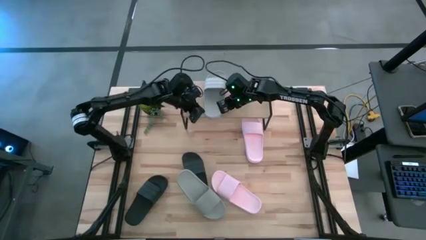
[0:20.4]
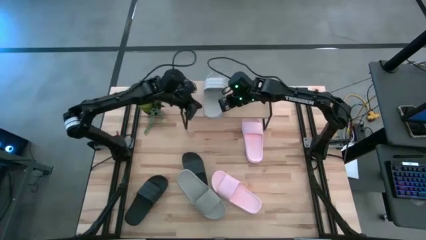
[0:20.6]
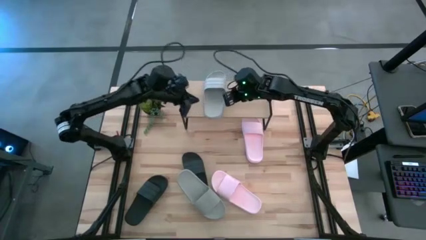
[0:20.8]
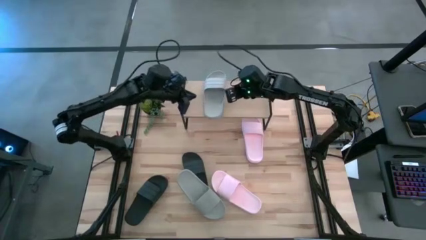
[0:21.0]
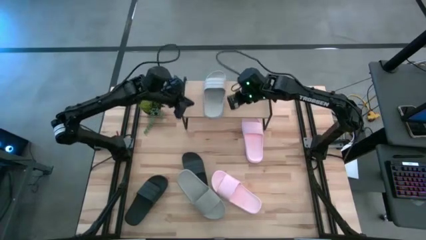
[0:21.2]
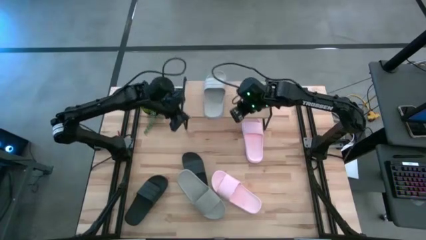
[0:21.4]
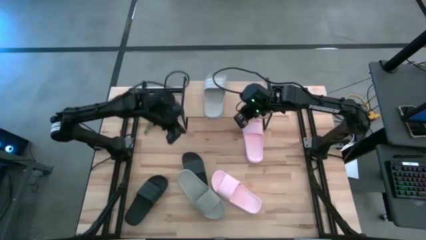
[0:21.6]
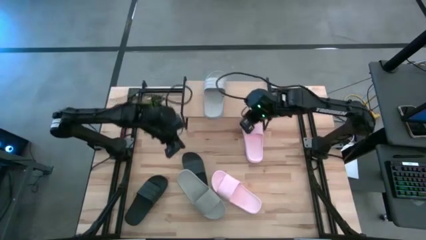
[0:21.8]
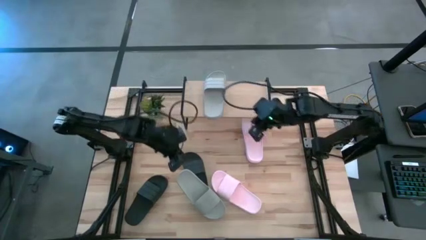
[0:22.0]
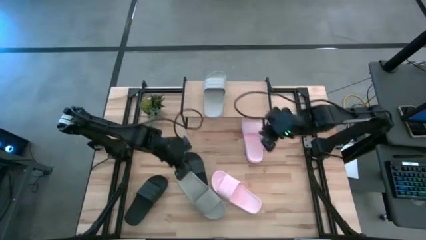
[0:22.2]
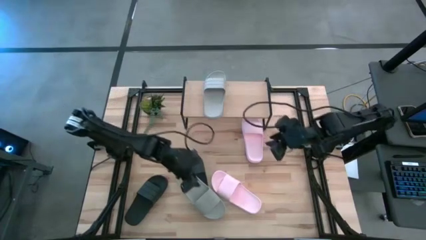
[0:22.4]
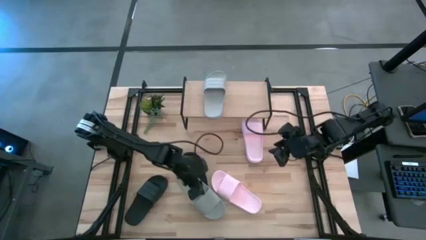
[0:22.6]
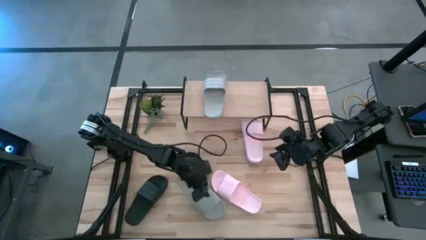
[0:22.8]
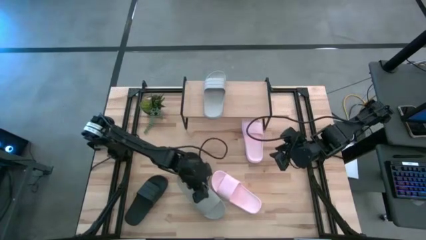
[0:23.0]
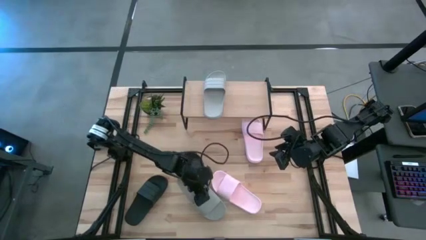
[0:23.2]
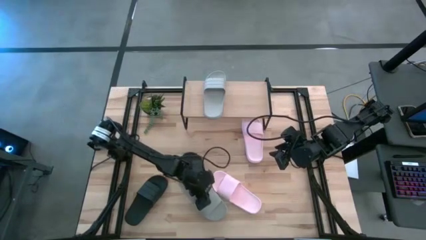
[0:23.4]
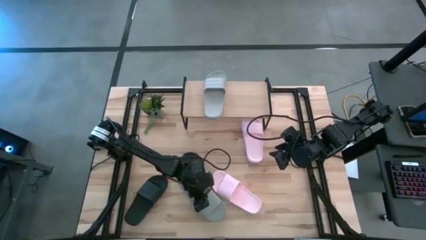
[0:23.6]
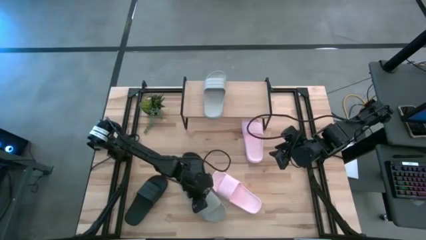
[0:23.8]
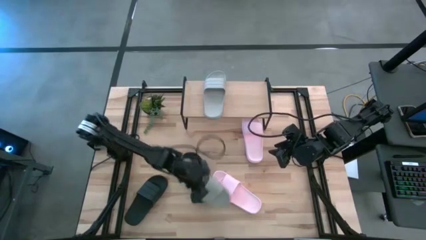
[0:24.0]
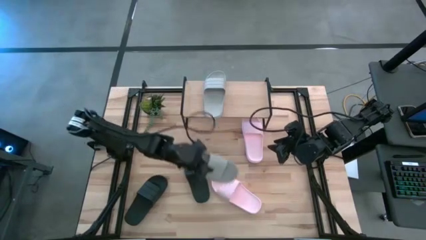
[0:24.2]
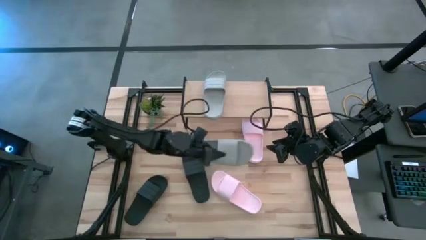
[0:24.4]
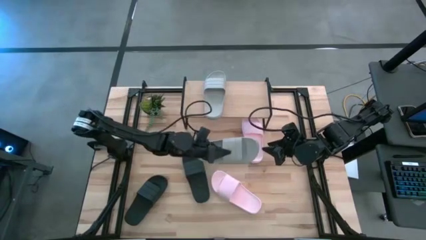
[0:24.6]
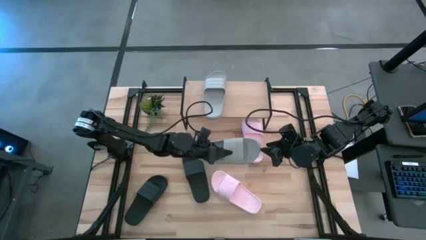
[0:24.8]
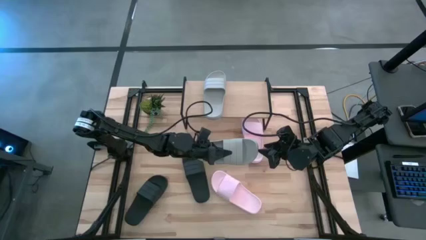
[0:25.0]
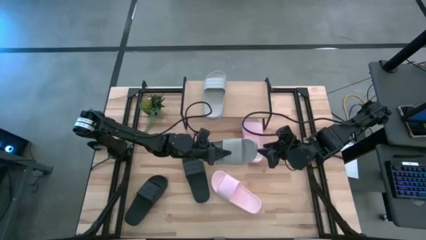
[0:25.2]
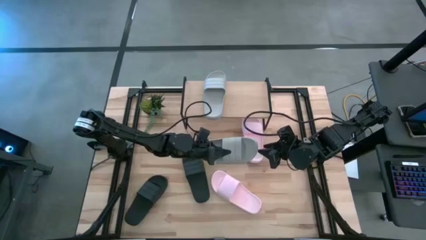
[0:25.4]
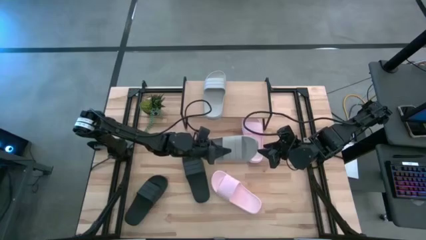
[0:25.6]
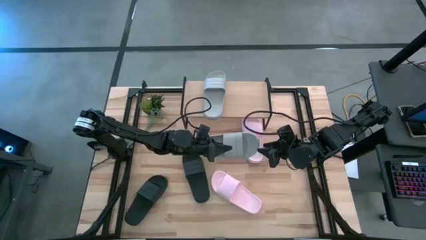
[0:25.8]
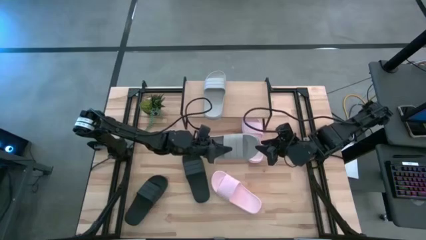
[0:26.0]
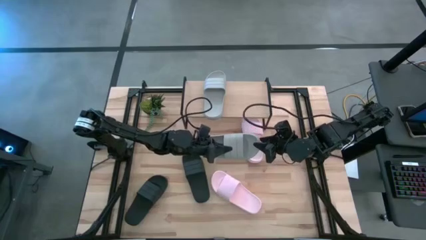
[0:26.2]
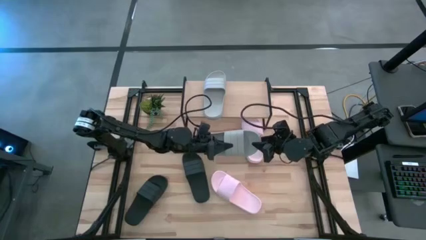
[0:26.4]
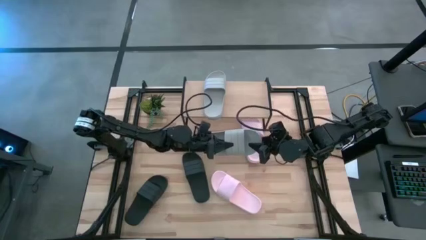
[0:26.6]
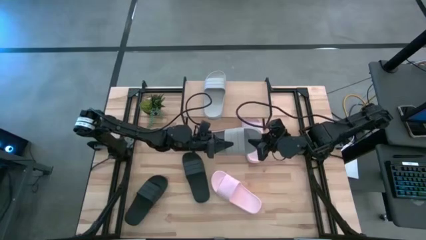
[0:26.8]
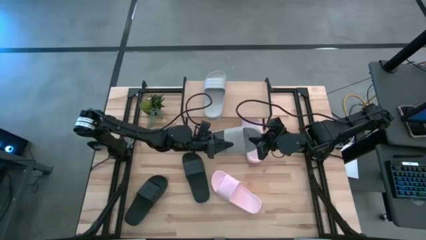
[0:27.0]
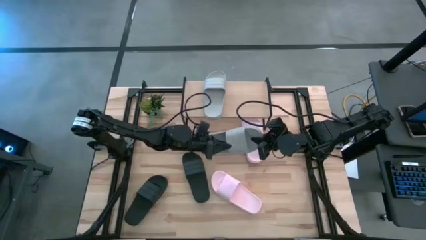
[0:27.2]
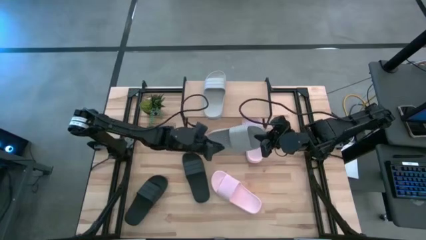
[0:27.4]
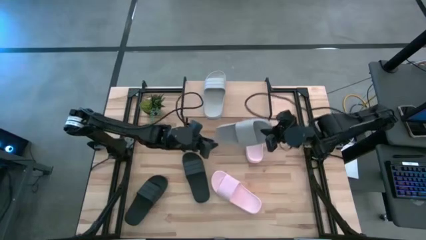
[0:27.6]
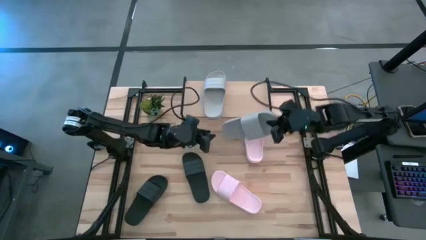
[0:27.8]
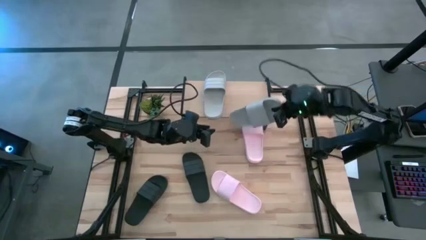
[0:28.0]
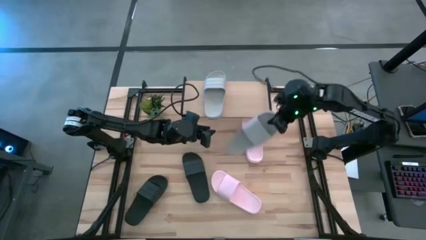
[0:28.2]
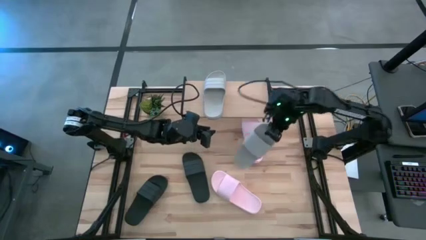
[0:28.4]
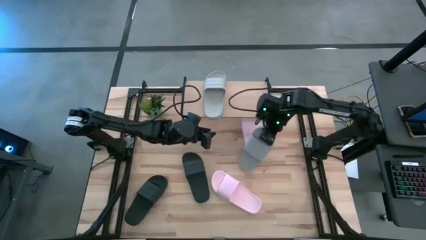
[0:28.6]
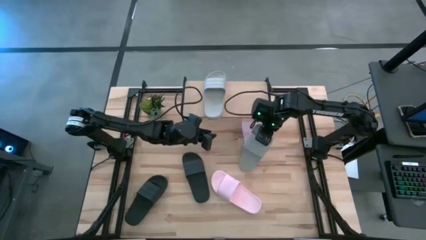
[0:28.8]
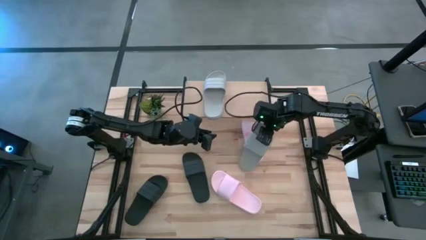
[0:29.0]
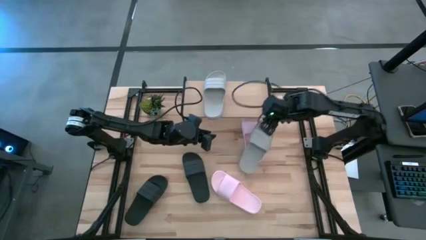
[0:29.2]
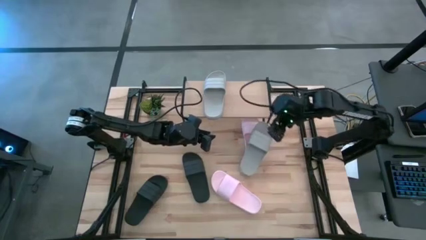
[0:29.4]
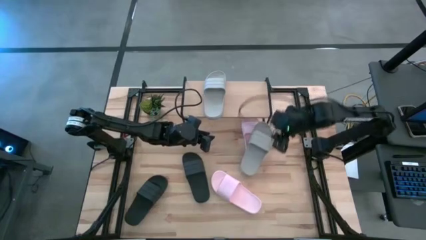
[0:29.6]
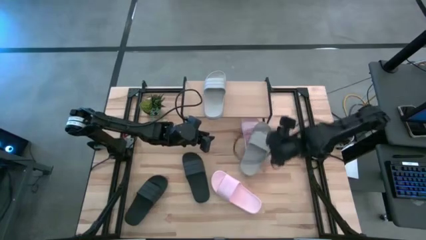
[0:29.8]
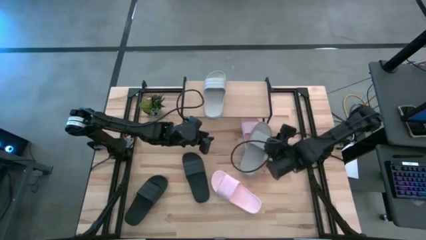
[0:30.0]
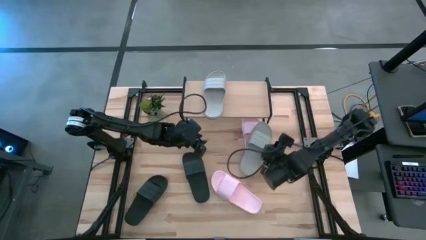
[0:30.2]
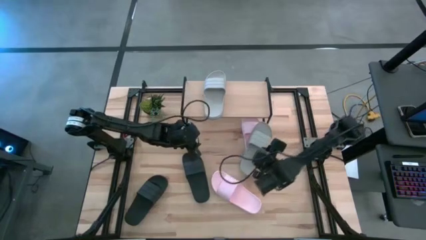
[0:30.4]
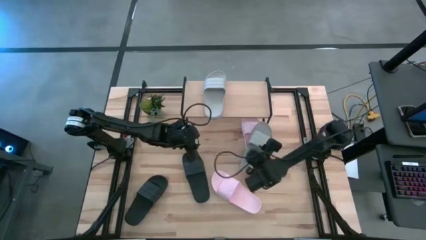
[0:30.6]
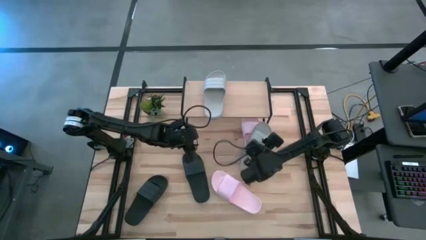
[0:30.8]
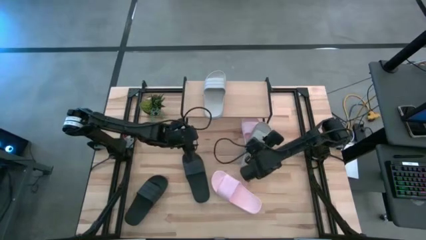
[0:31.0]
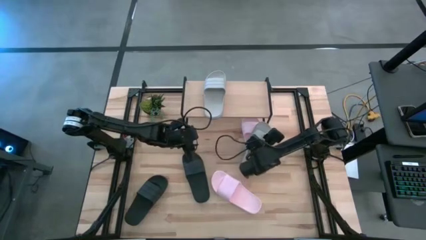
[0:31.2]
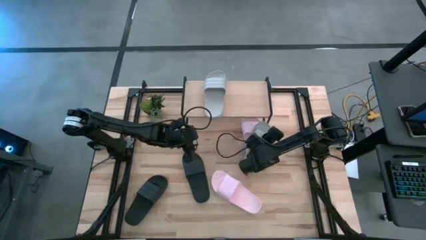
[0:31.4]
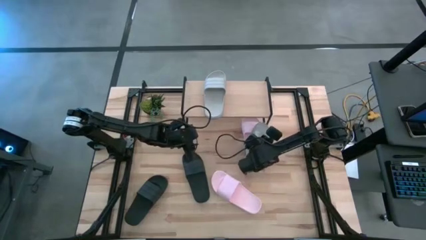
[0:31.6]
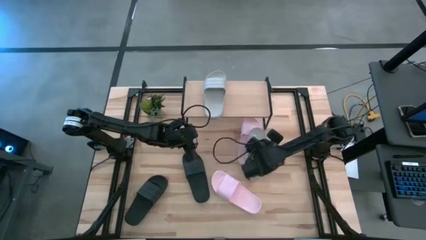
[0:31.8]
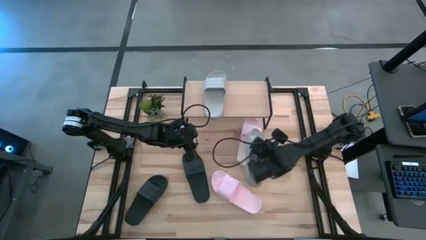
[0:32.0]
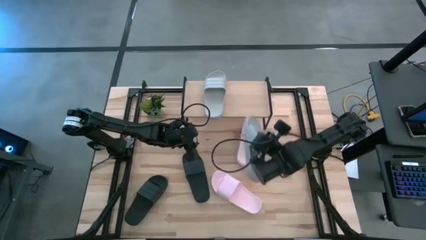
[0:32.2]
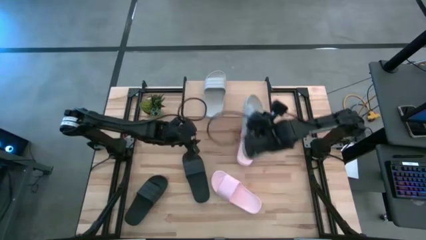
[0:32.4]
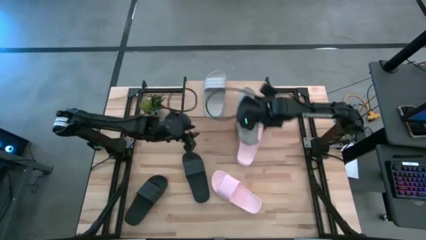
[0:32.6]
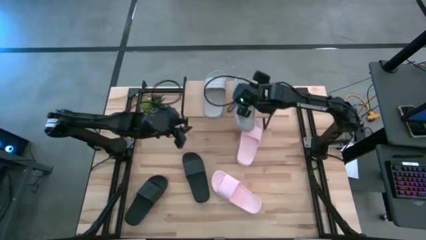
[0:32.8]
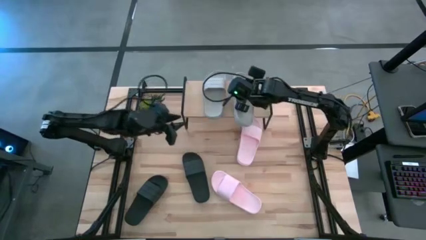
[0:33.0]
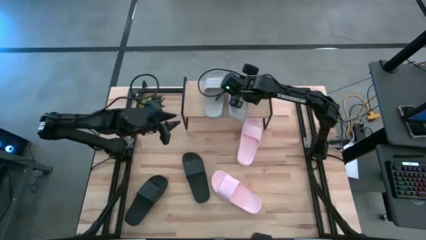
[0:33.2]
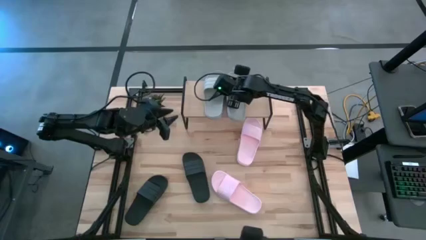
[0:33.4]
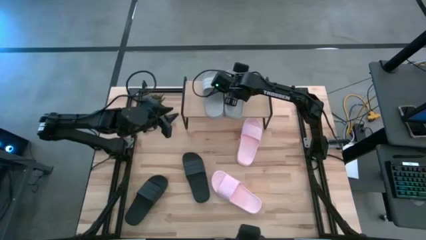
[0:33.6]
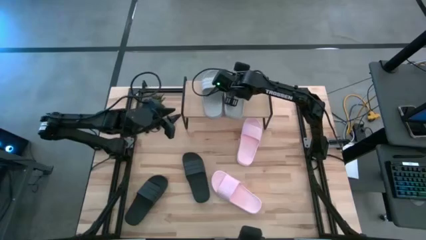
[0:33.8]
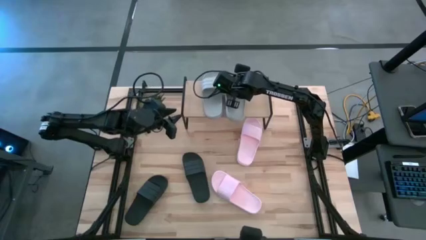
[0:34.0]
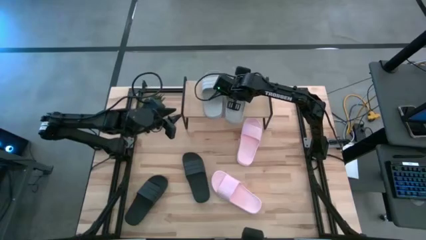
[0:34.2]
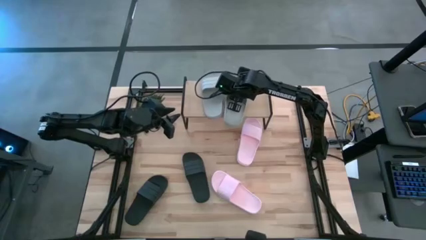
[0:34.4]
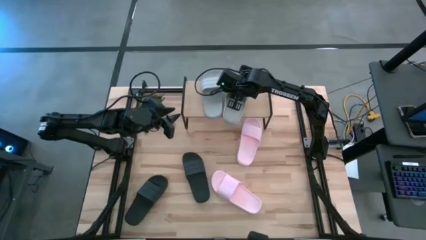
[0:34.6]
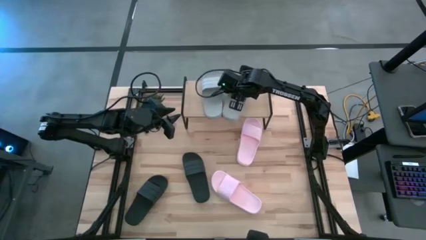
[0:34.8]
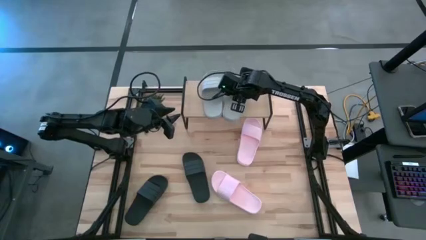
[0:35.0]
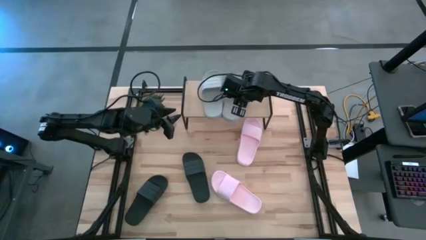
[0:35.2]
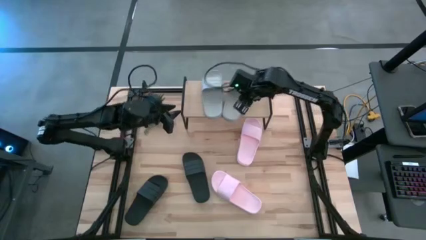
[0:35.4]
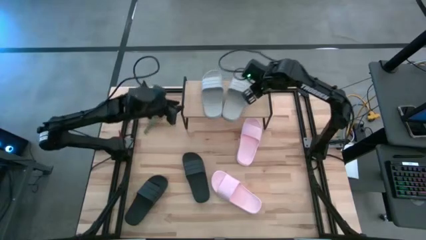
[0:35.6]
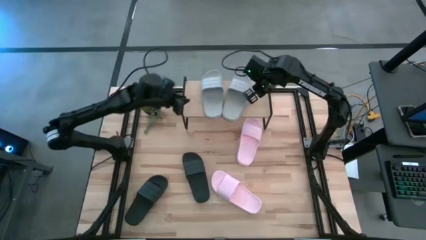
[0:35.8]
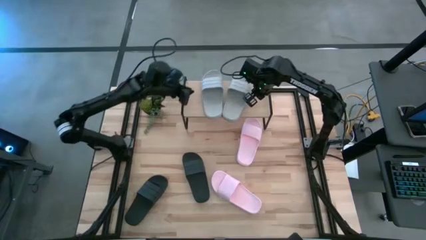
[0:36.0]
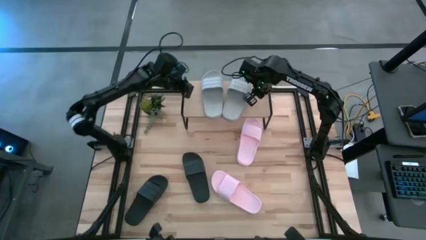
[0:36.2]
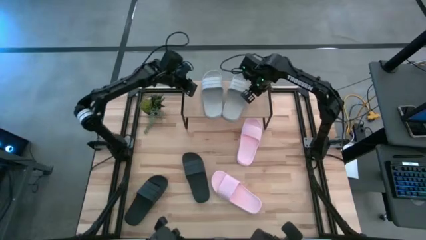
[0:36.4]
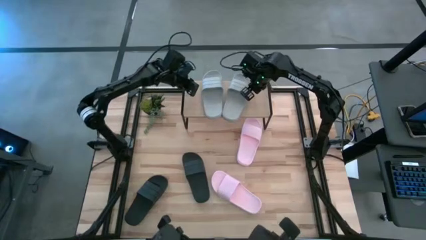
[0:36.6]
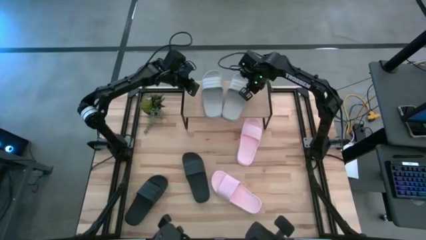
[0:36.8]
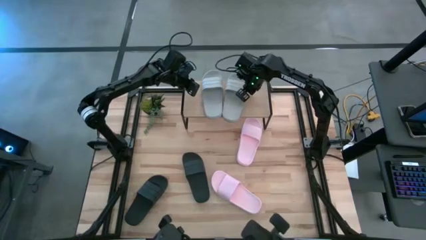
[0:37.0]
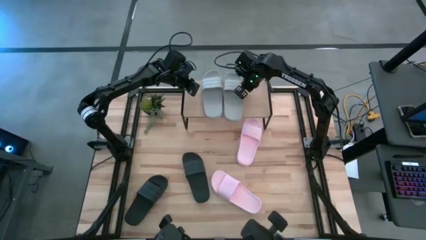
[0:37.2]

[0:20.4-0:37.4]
Task: Pick and place slides into the shelf
Put the gray slide on the shelf
